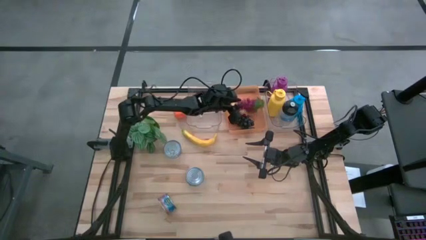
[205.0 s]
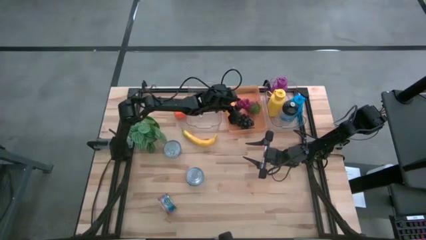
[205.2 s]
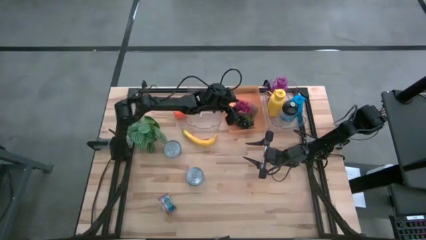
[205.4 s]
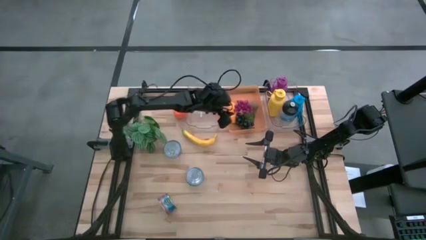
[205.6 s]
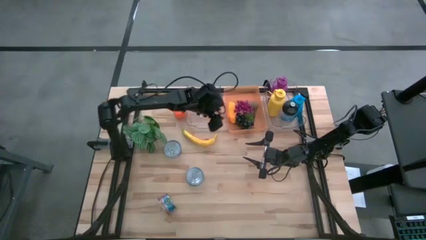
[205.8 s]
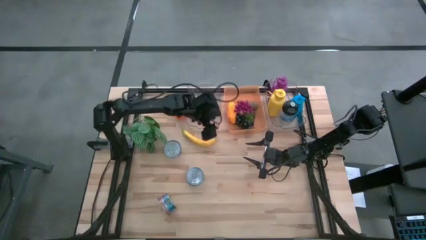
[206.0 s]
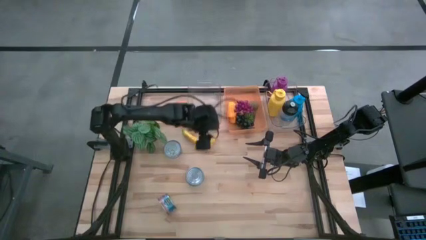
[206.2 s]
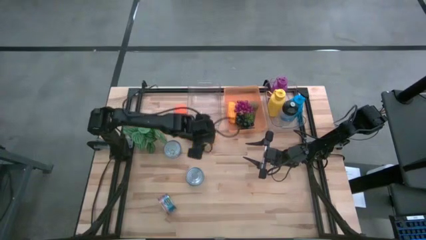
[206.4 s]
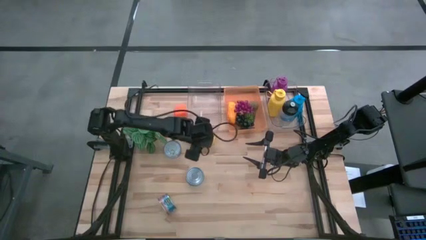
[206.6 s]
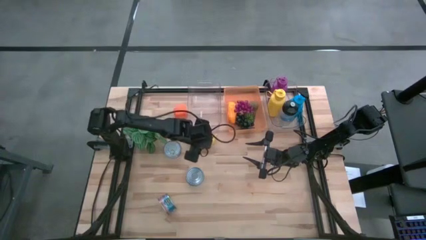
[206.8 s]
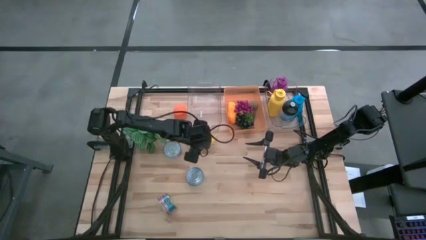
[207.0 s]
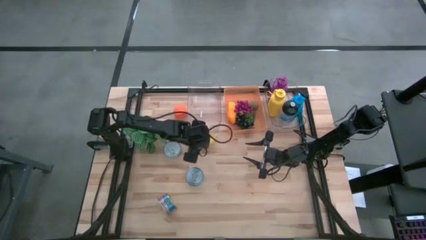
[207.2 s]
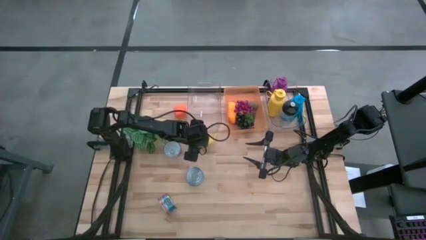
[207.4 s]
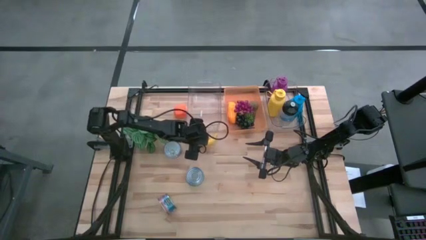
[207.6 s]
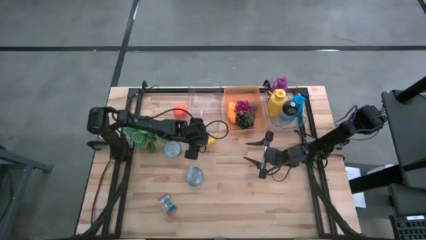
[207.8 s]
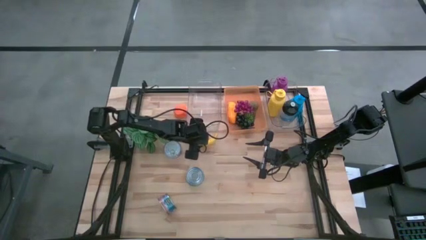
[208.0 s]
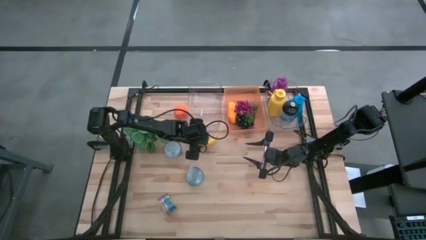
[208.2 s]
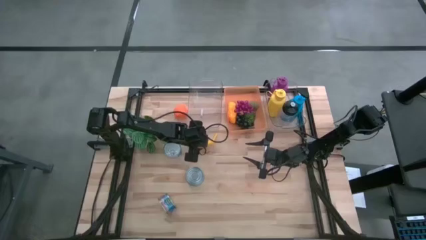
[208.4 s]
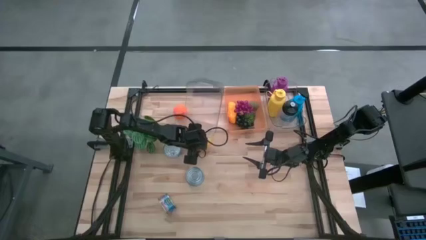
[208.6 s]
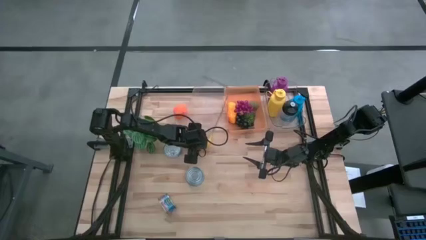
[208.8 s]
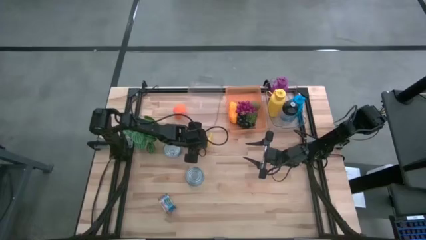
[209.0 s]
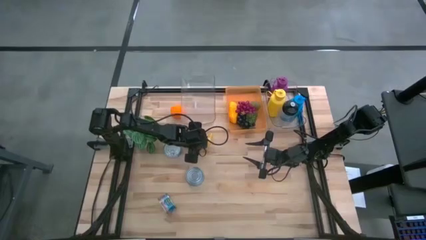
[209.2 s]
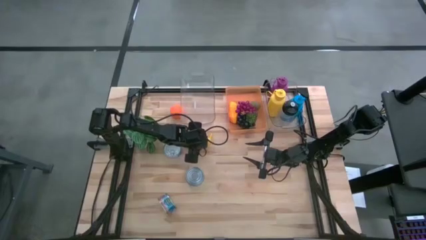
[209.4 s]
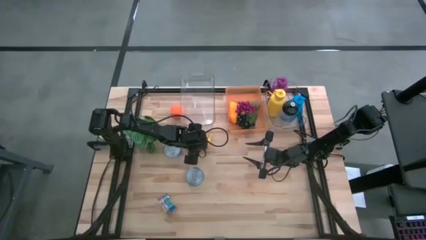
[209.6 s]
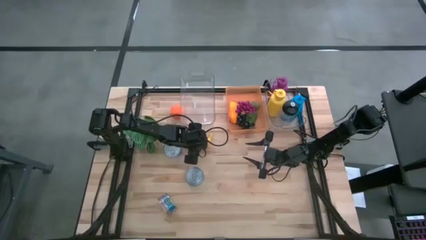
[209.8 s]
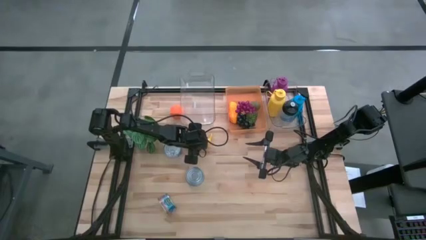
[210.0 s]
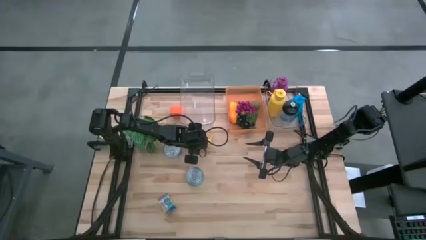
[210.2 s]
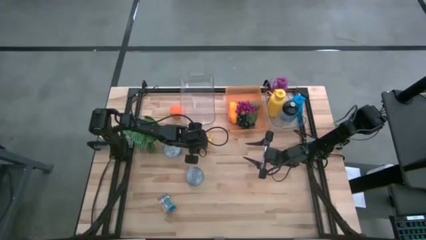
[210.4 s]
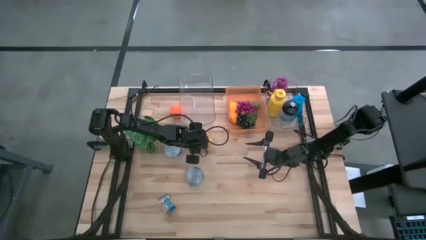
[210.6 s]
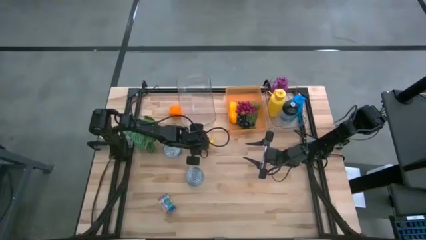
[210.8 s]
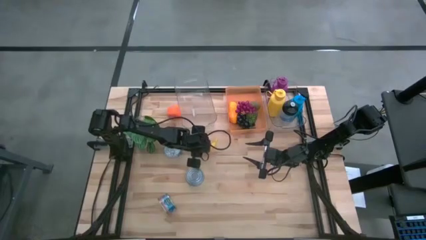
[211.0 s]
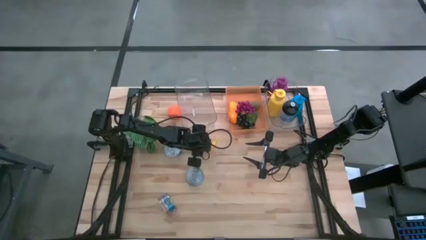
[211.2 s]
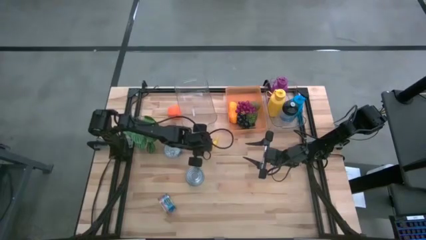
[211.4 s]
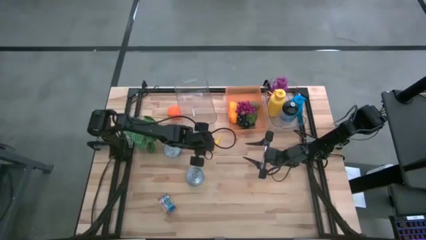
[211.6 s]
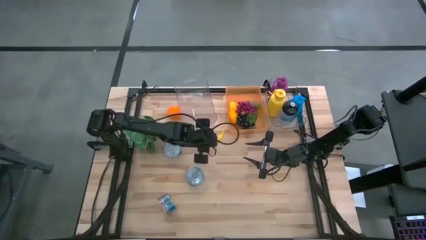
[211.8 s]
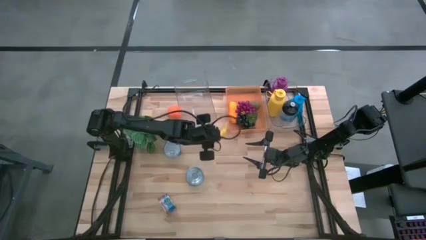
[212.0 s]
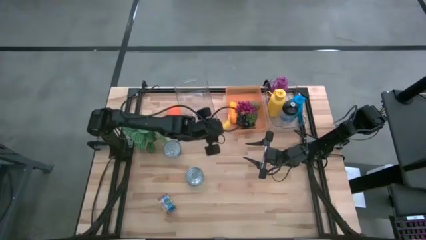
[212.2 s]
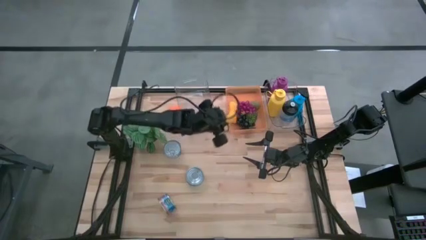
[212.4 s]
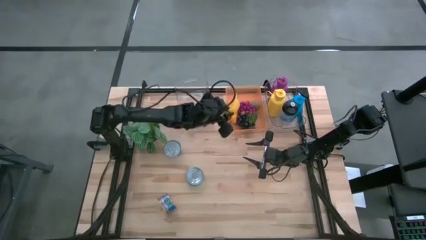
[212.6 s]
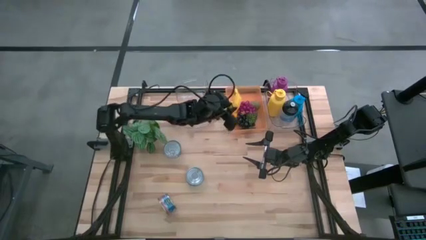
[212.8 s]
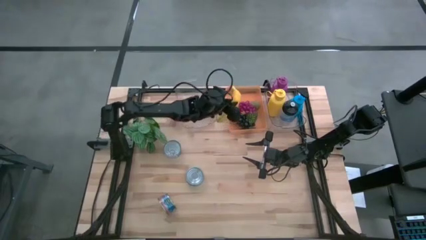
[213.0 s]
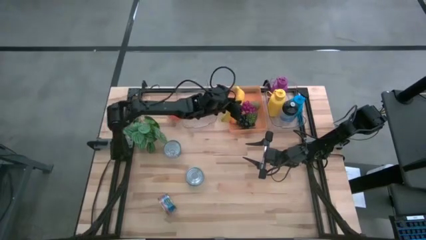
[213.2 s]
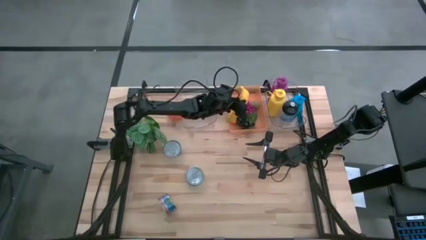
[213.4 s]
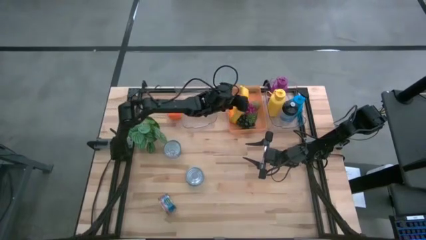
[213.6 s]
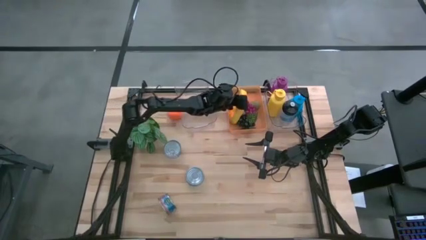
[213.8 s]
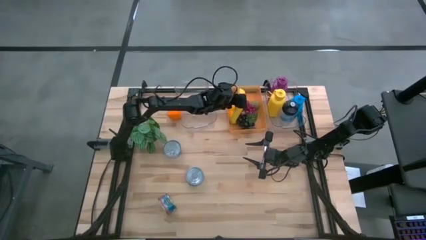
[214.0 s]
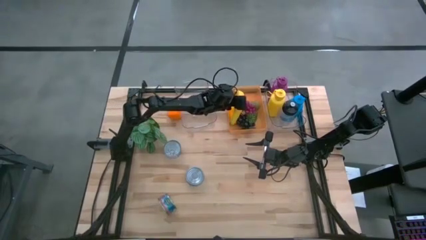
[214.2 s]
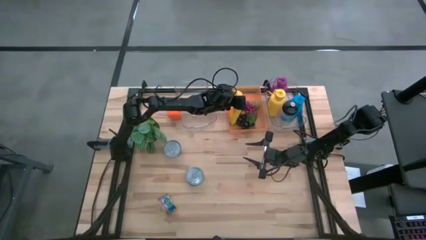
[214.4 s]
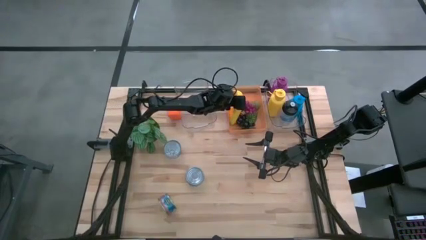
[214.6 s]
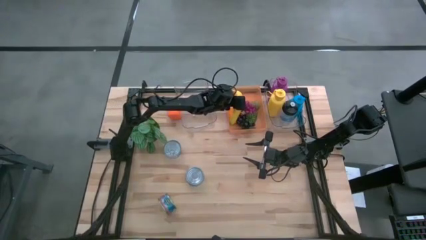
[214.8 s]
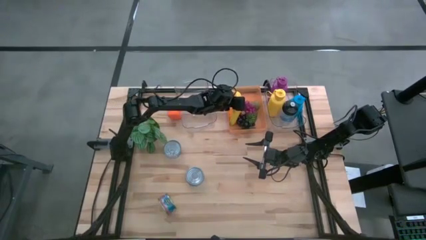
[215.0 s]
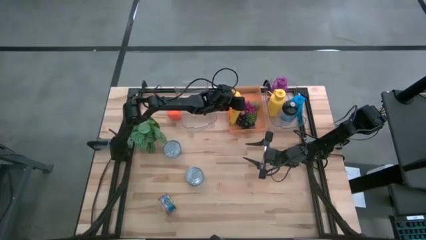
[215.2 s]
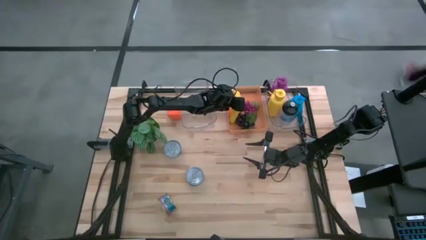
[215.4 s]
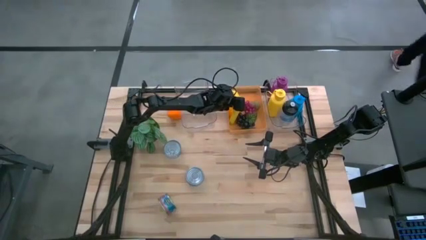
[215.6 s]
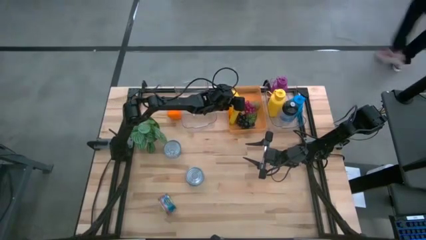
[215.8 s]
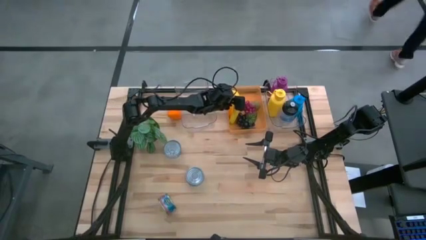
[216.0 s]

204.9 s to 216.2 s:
Task: Pick & Place Food Item
Put the yellow banana into the orange bin

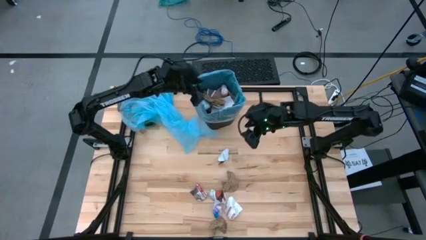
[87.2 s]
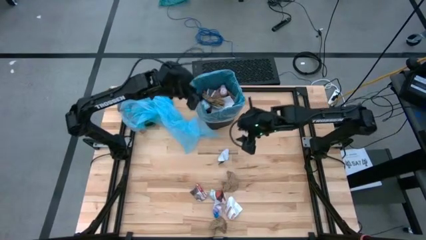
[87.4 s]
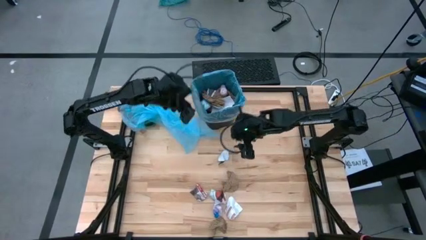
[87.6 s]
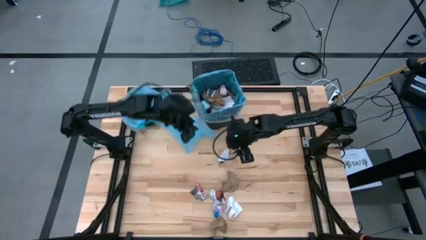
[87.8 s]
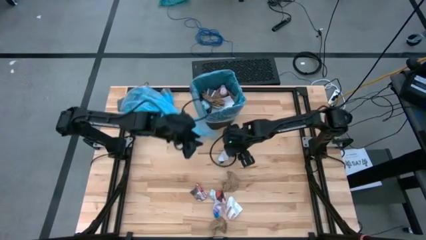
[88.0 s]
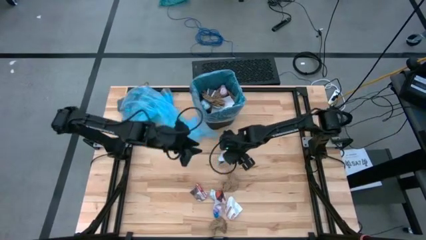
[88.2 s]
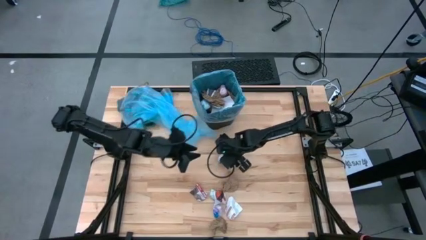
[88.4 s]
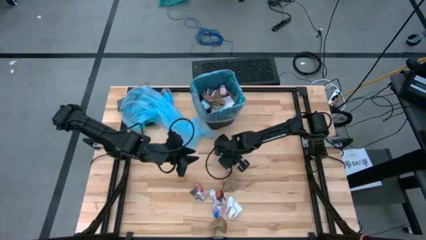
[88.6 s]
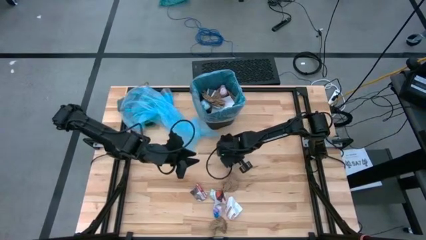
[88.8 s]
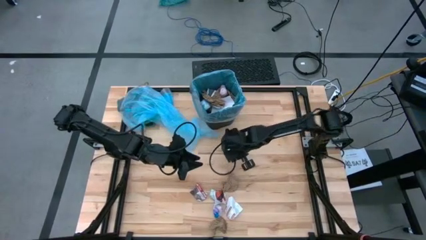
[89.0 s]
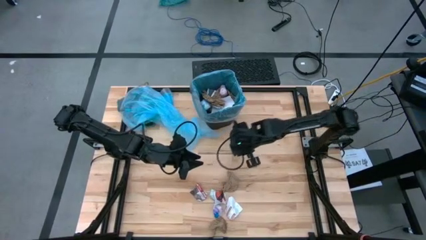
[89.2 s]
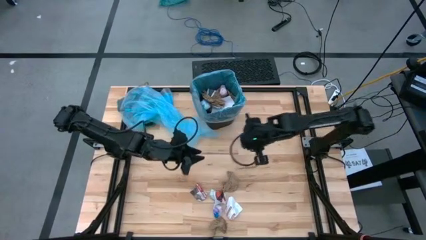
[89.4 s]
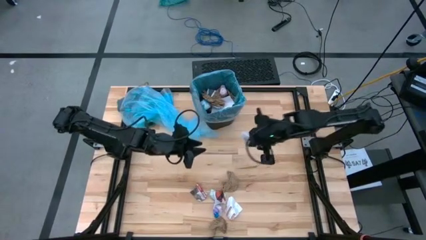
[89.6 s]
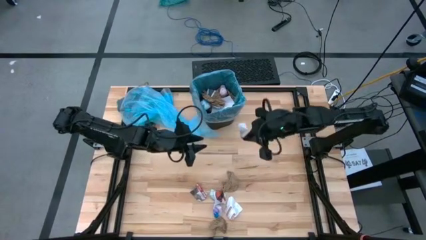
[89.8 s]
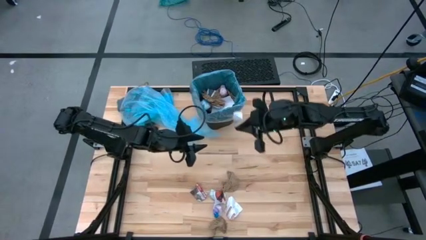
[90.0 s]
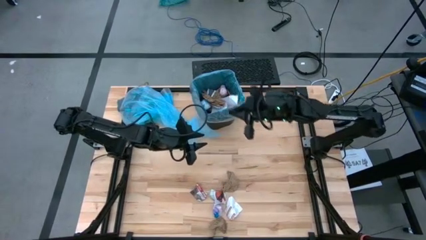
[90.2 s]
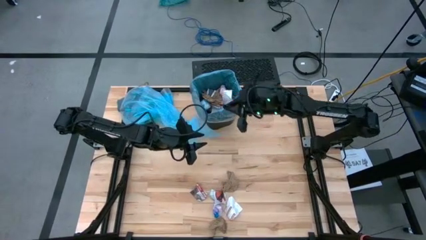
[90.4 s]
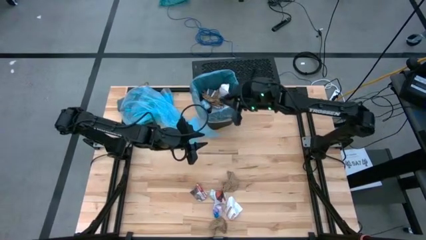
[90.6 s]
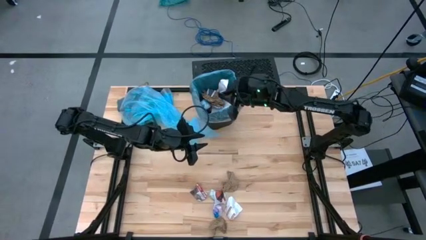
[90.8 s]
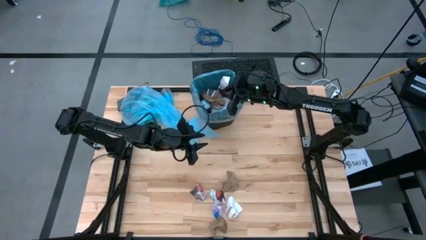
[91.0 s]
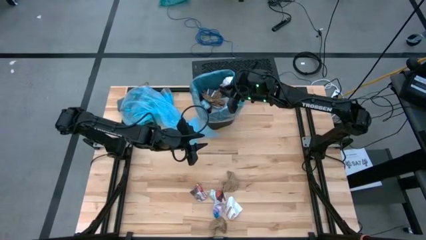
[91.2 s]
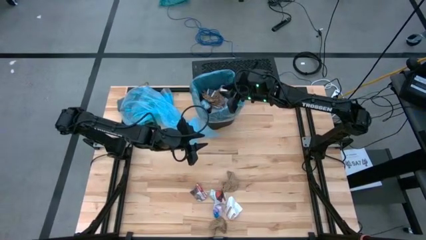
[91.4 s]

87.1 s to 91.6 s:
Task: place trash/remove bag and relplace
Put the white paper into the trash bin

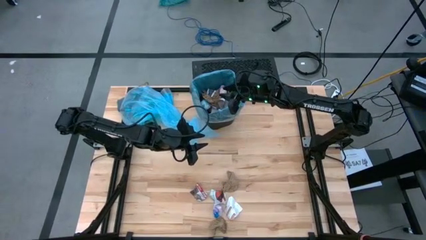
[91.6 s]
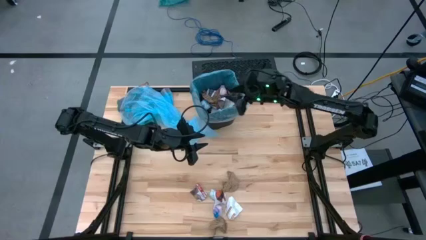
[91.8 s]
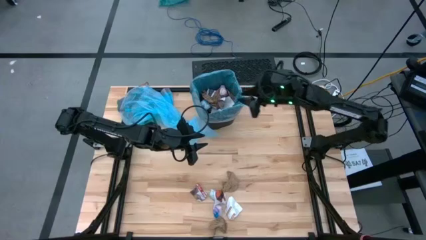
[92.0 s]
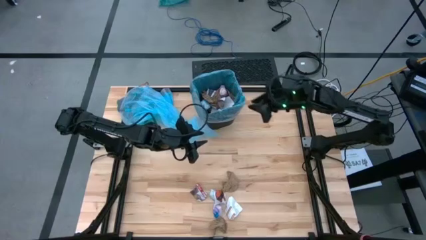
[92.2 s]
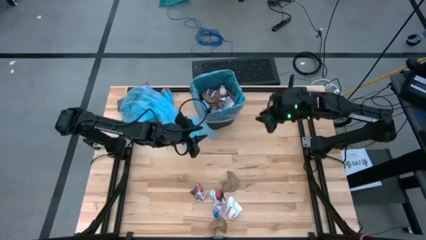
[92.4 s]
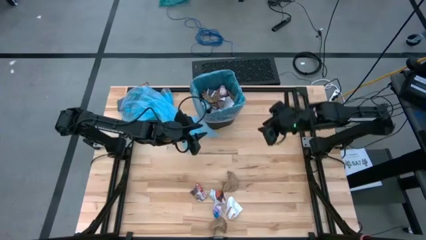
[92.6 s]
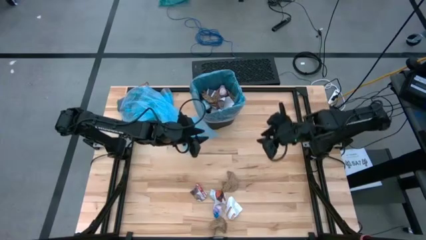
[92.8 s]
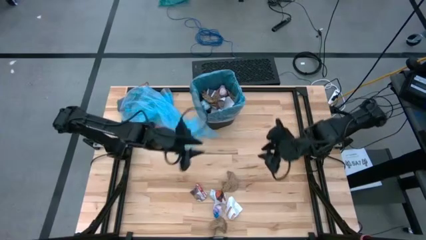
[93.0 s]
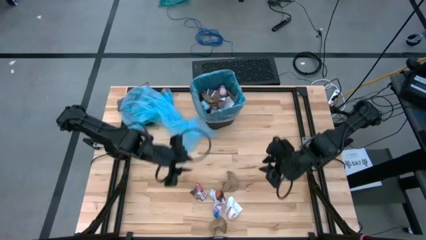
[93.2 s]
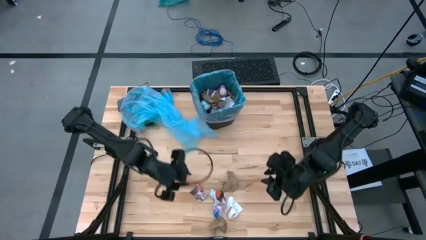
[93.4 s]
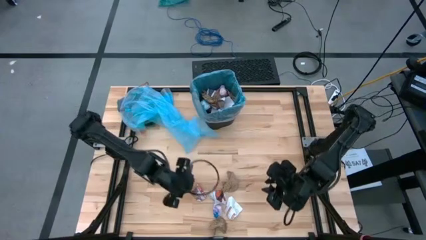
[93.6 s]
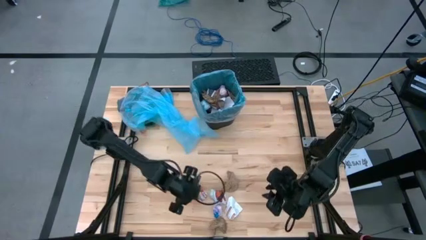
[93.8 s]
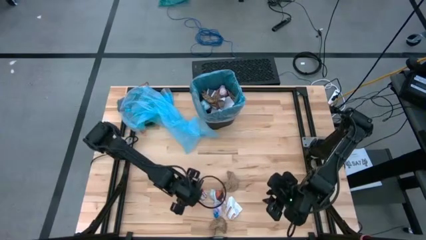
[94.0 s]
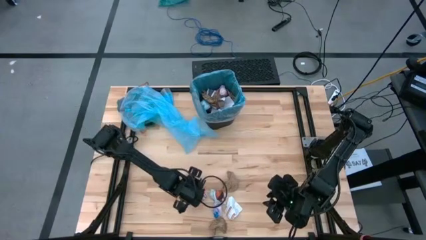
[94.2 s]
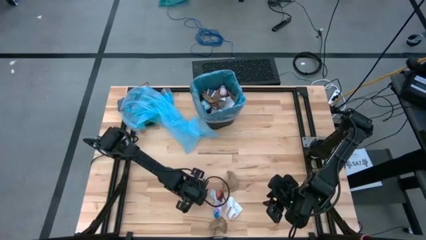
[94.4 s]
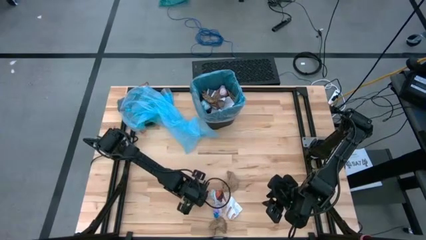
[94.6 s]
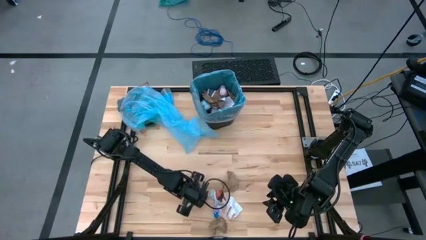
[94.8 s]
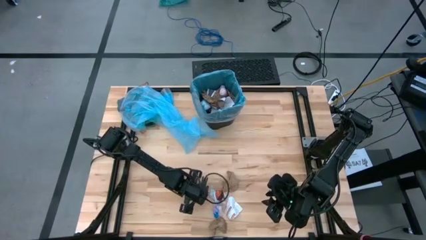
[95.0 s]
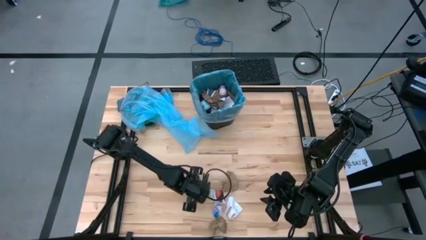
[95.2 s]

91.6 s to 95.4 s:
Put the red paper into the trash bin
